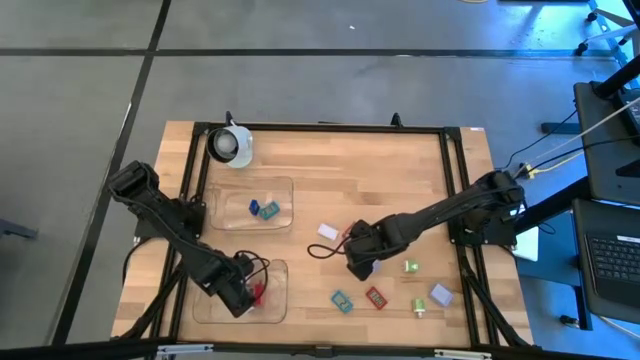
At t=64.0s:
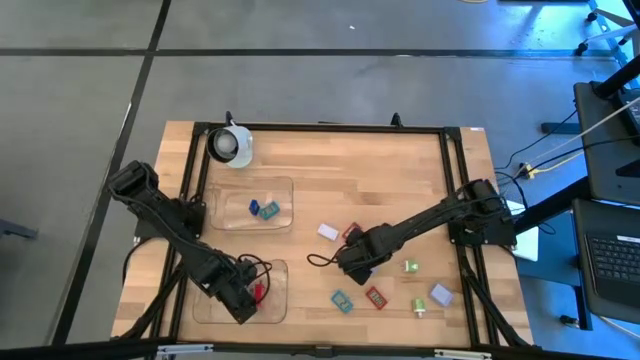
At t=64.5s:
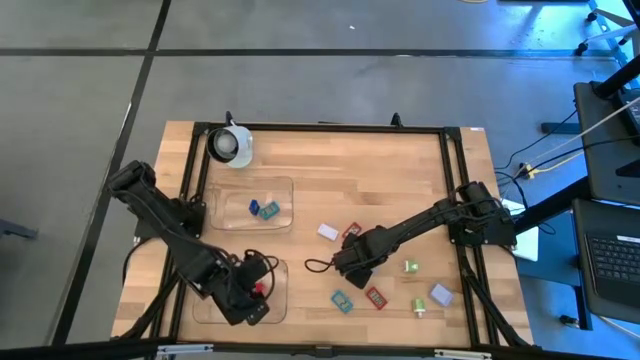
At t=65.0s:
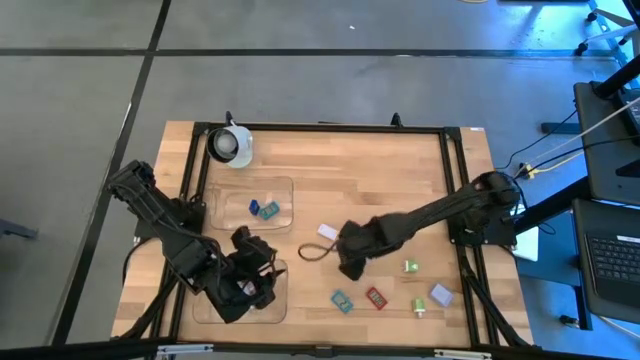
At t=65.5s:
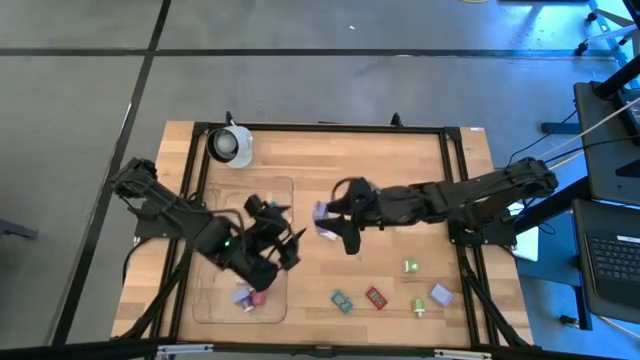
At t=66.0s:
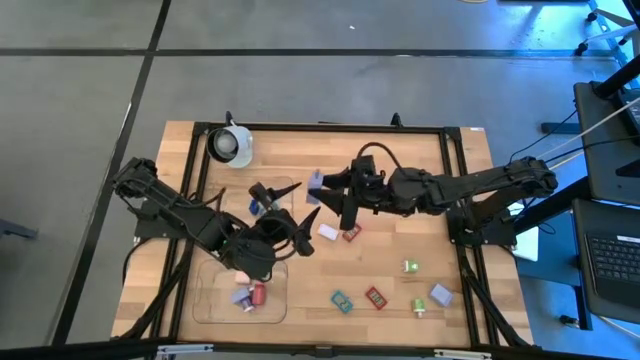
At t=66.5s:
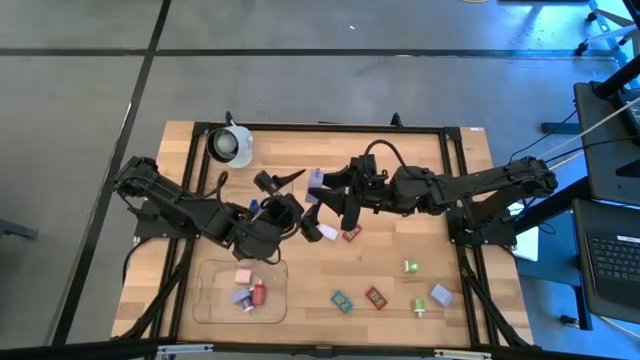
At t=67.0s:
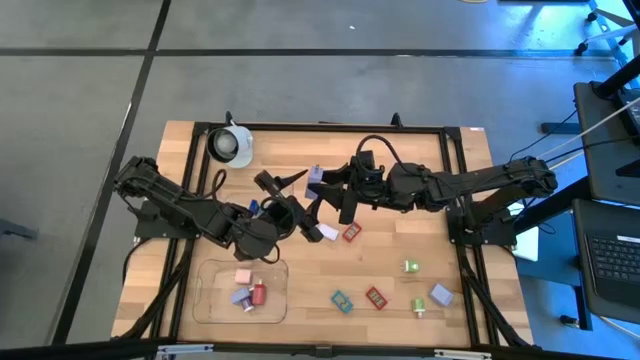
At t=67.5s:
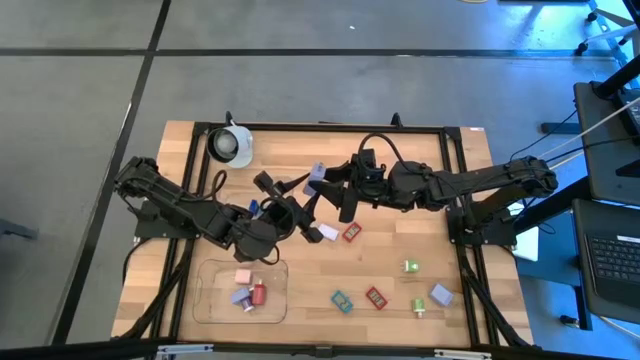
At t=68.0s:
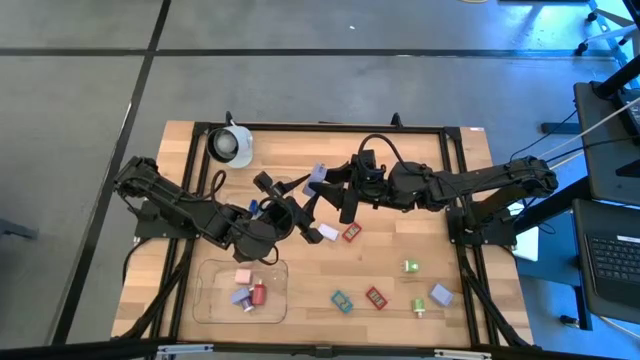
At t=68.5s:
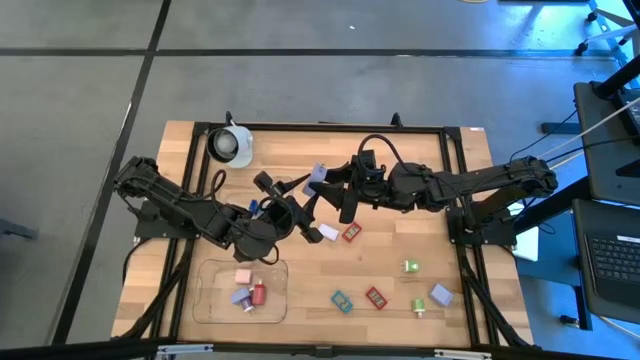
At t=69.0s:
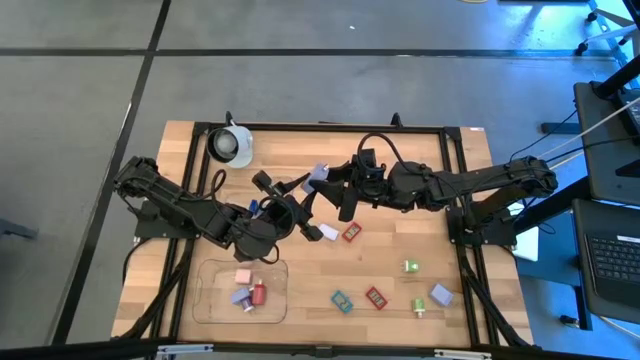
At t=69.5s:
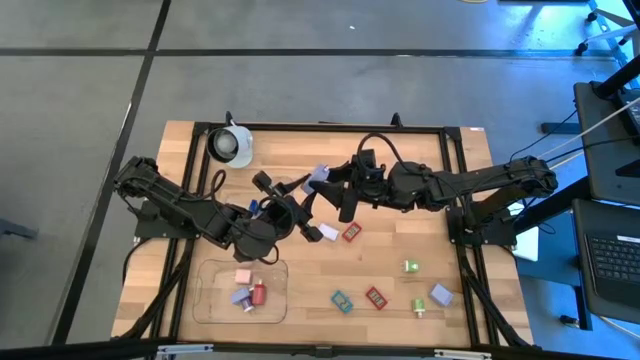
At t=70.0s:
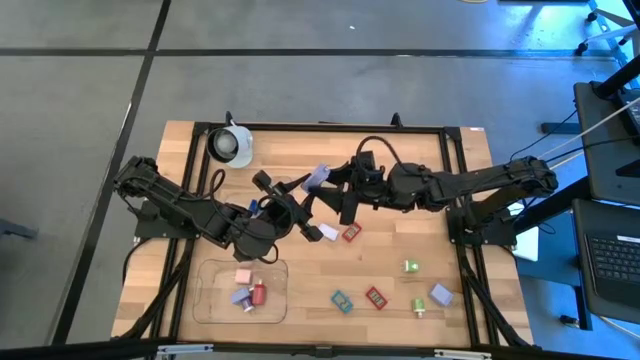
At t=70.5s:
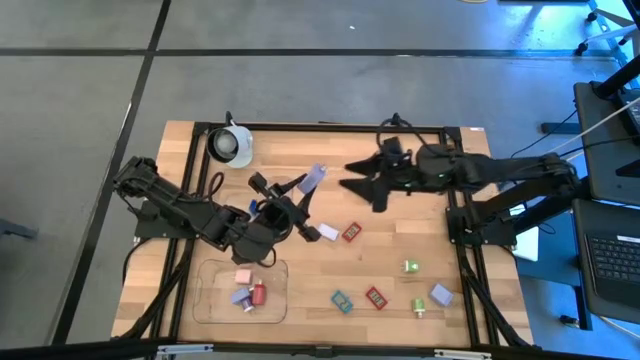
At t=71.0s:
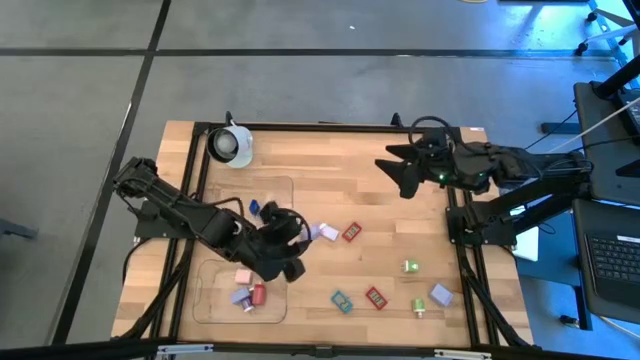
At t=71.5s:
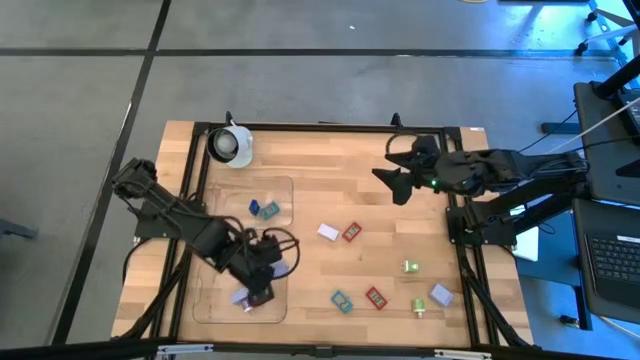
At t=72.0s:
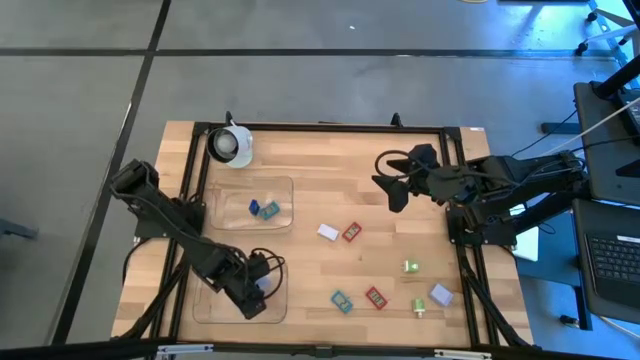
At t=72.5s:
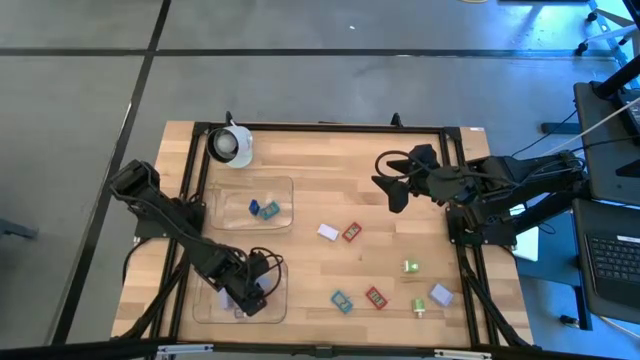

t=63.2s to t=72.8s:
Task: Pick & Place Office items
Put the left light blue charger adapter into the bottom transparent bin

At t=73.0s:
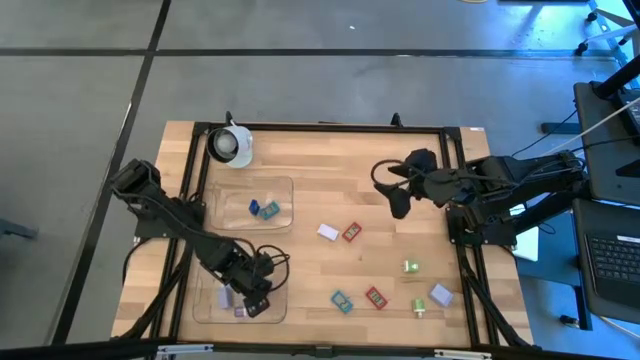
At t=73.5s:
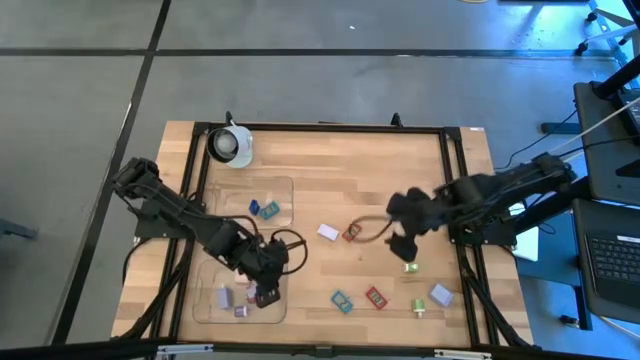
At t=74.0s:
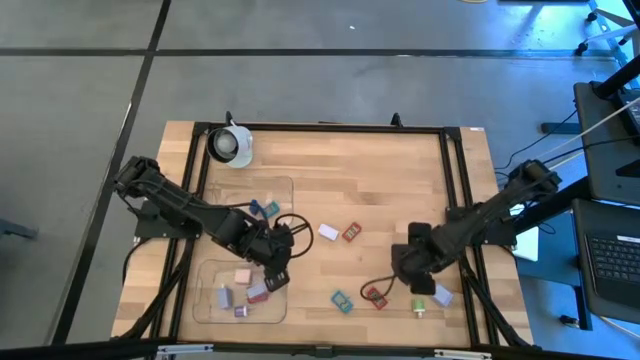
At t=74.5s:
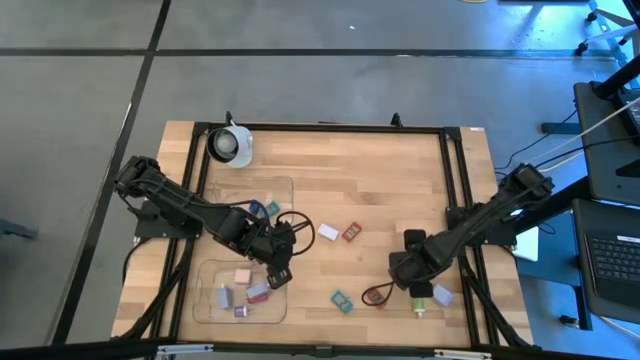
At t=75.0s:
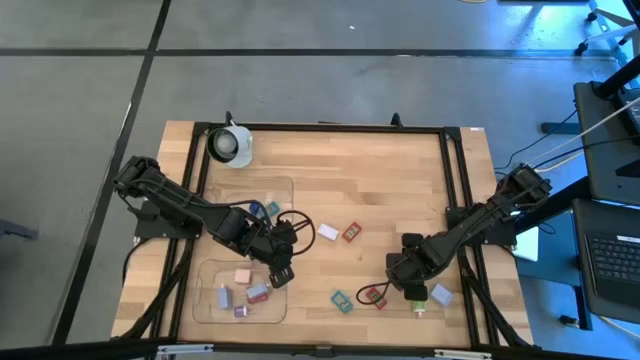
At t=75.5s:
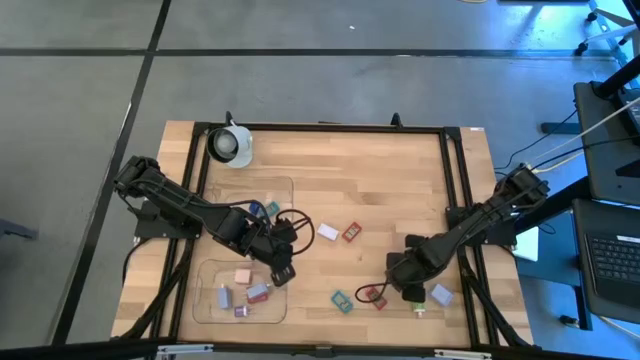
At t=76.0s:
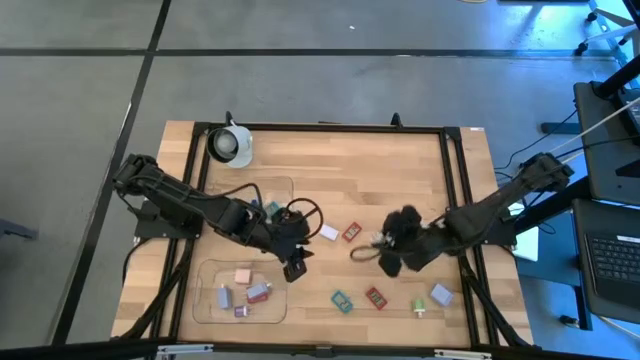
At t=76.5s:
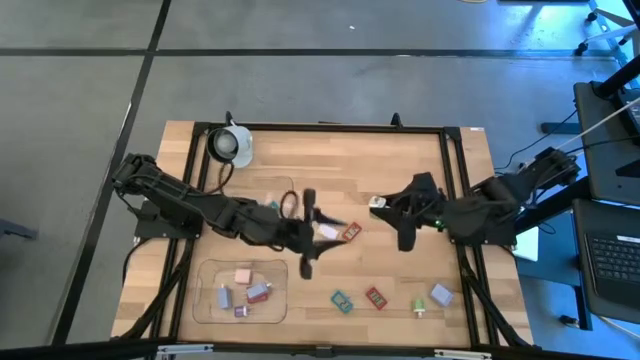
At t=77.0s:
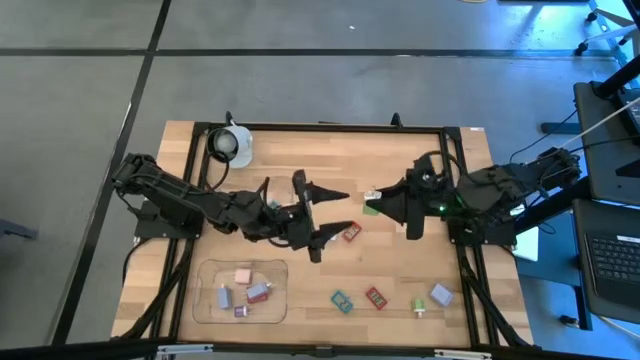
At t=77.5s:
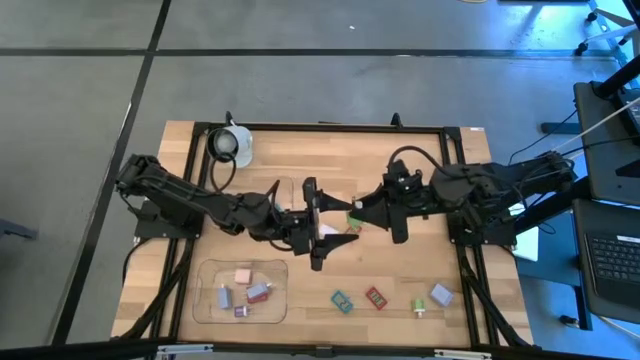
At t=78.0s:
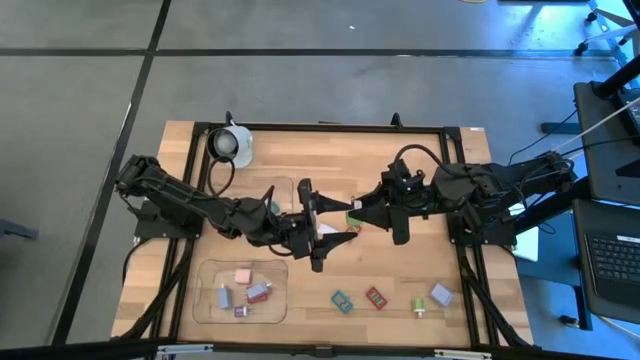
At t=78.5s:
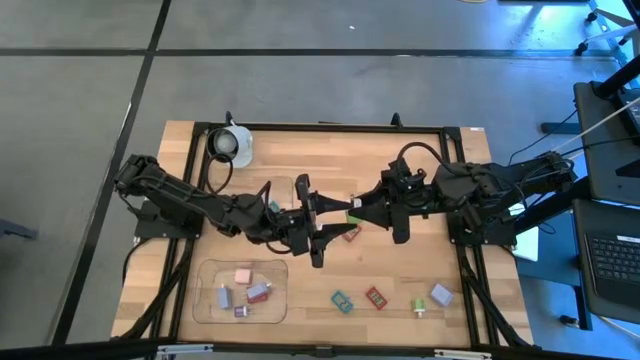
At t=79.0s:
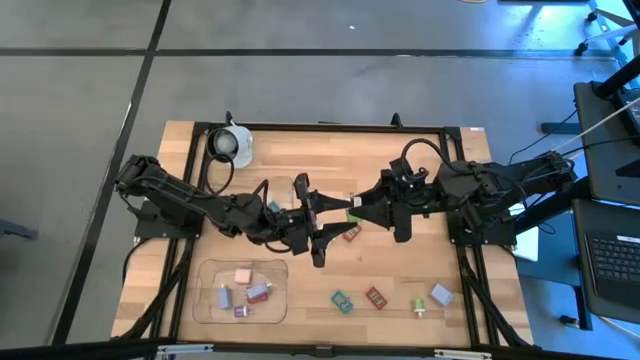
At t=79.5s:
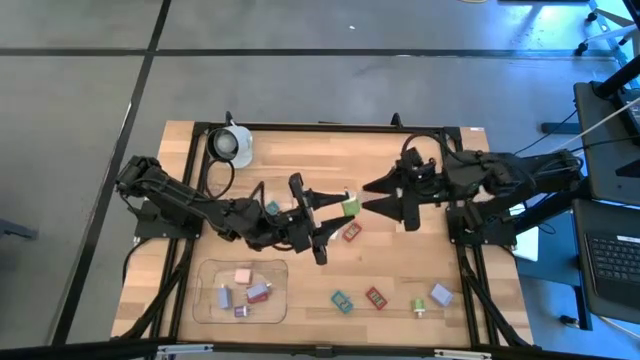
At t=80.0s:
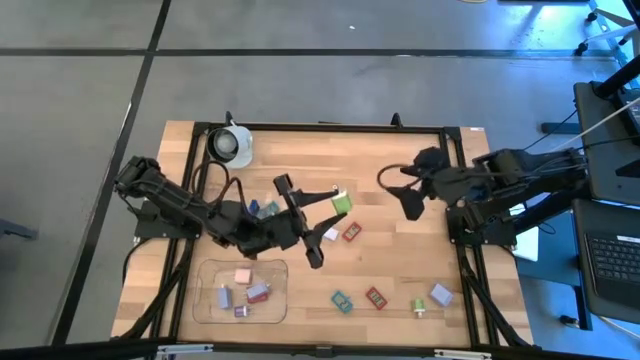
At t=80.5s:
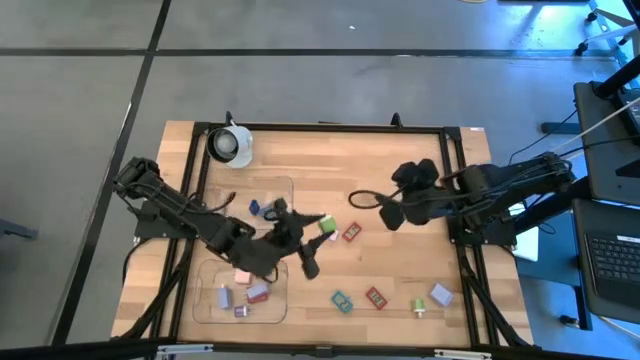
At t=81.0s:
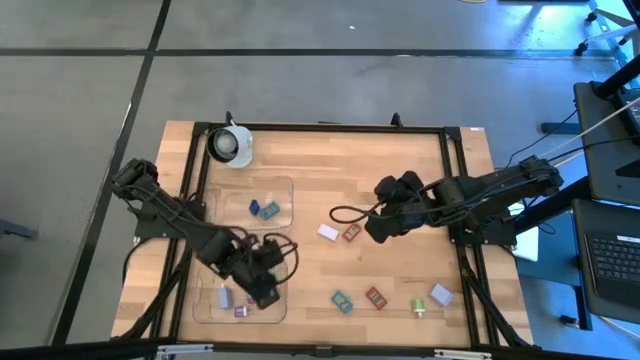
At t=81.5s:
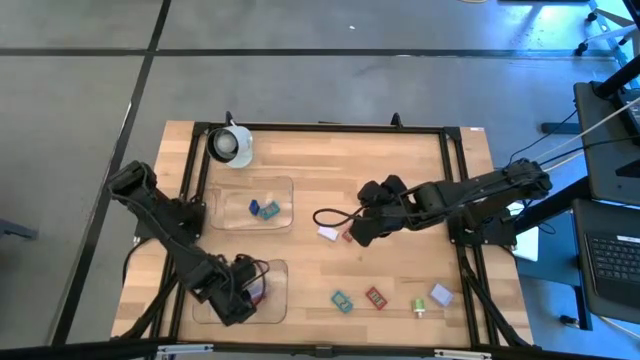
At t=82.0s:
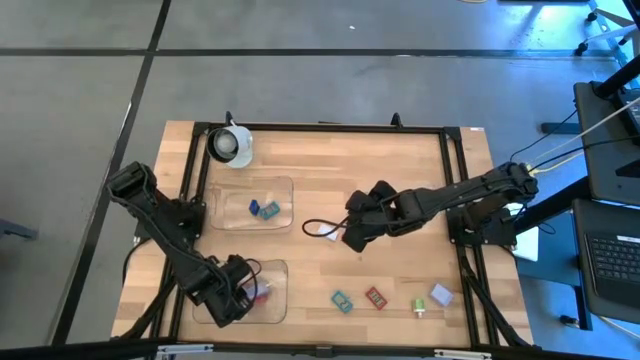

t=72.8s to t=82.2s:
Put the top green charger adapter into the bottom transparent bin

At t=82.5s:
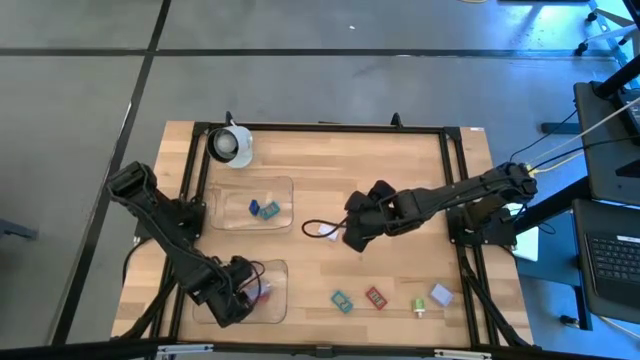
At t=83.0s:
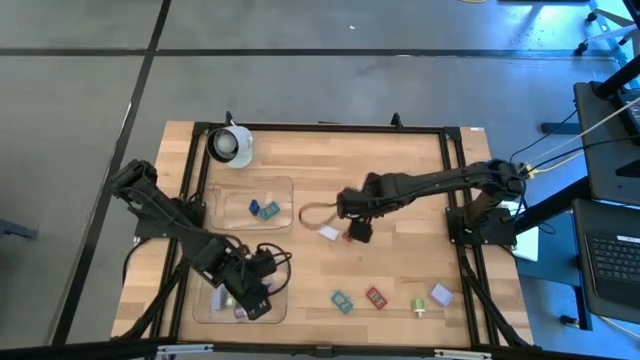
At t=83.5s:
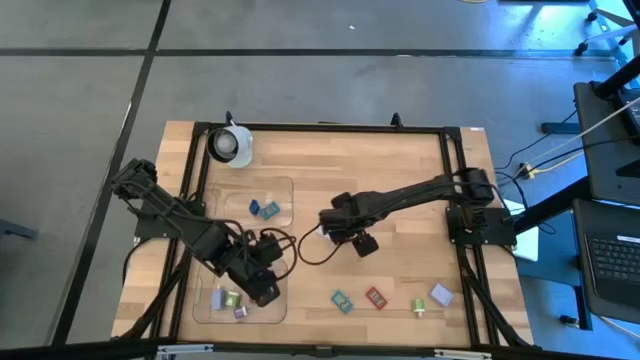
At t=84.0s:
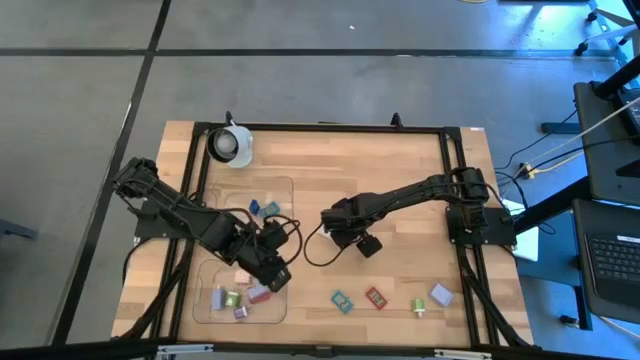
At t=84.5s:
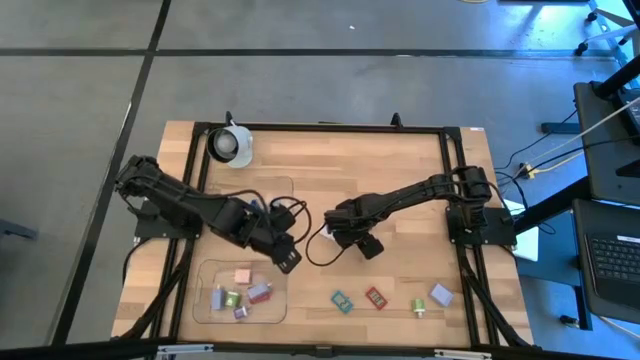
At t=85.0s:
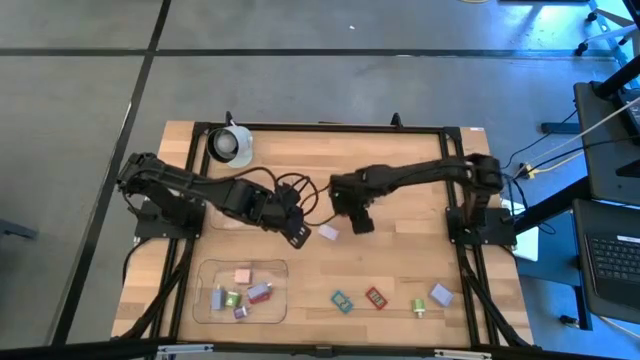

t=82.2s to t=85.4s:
Put the top red timer into the top transparent bin
